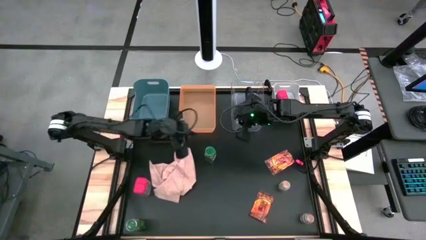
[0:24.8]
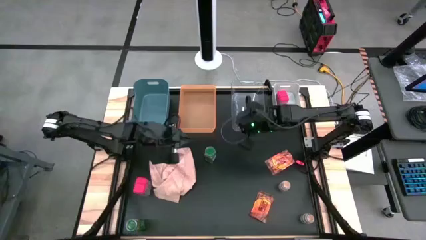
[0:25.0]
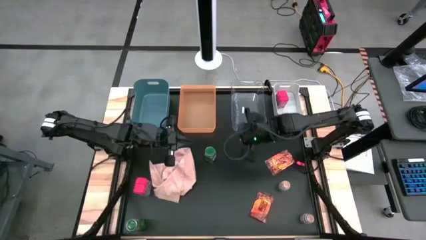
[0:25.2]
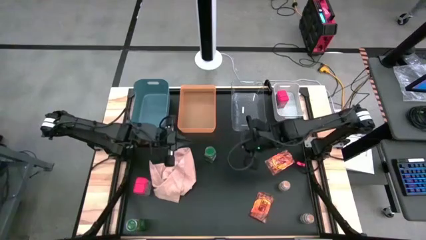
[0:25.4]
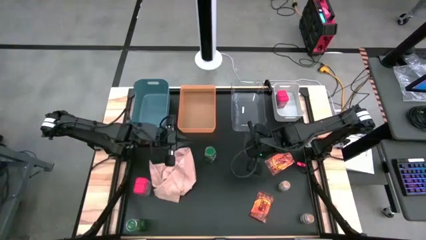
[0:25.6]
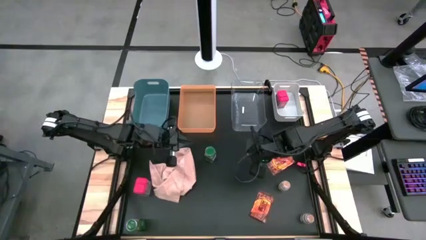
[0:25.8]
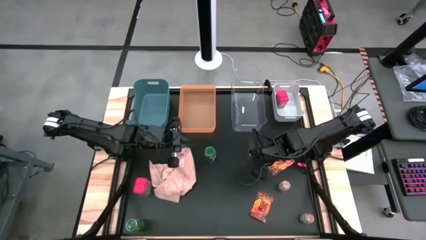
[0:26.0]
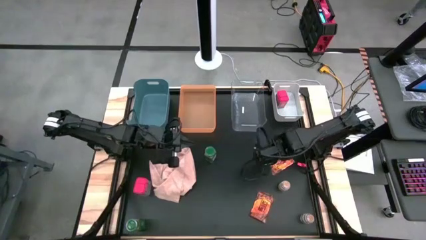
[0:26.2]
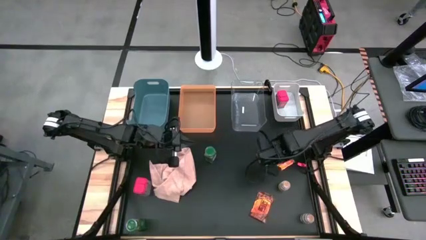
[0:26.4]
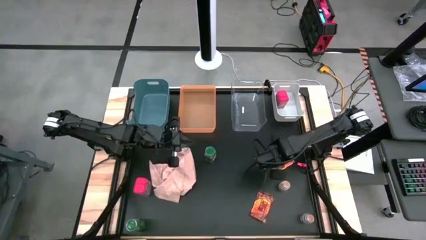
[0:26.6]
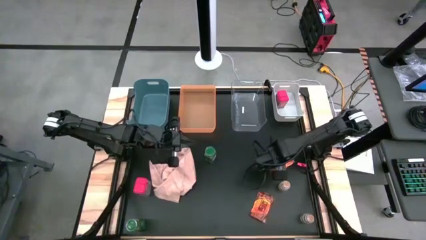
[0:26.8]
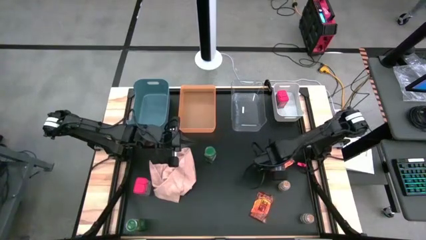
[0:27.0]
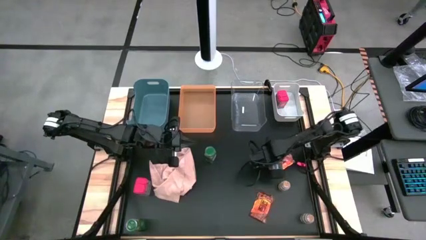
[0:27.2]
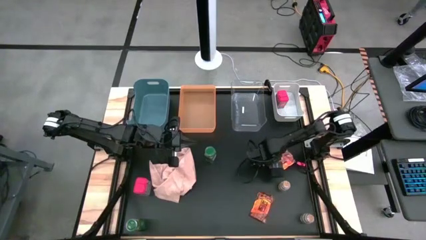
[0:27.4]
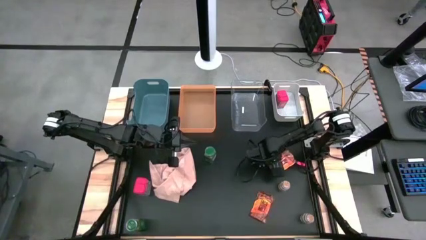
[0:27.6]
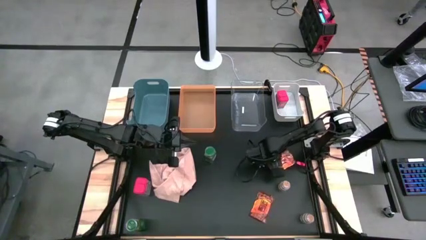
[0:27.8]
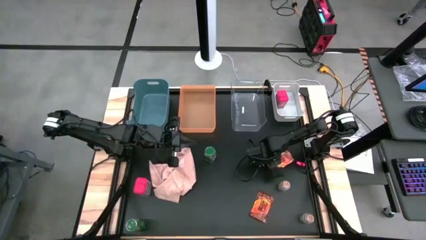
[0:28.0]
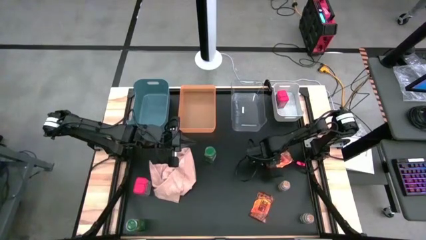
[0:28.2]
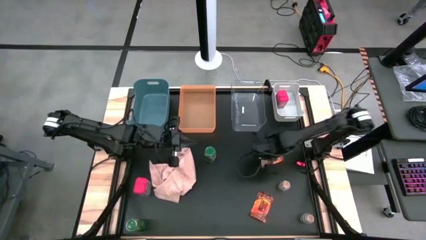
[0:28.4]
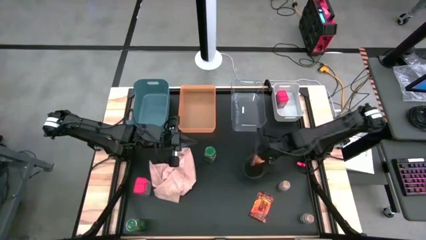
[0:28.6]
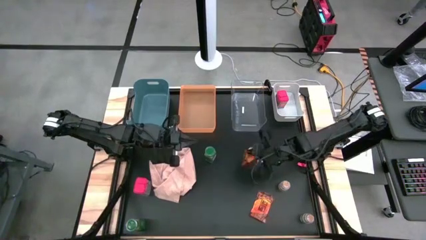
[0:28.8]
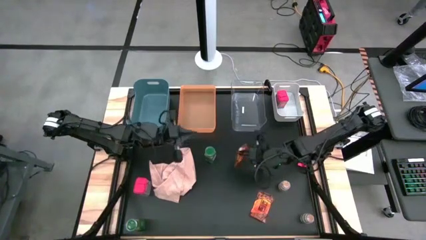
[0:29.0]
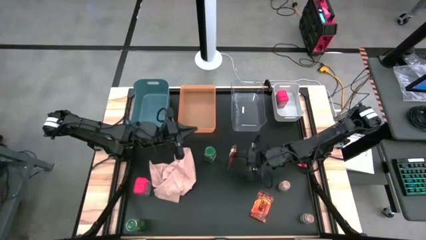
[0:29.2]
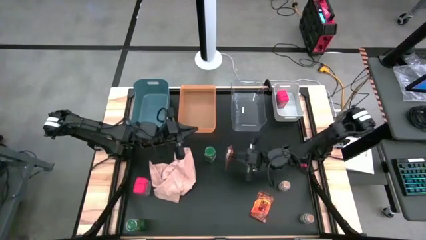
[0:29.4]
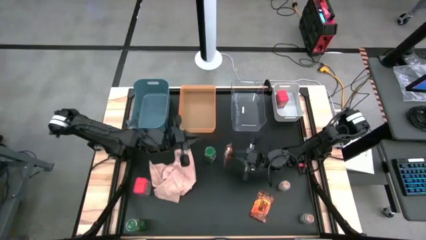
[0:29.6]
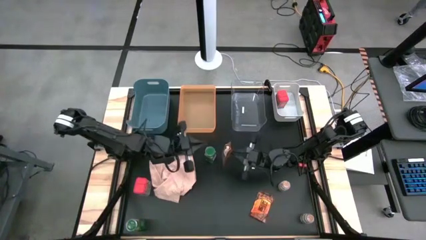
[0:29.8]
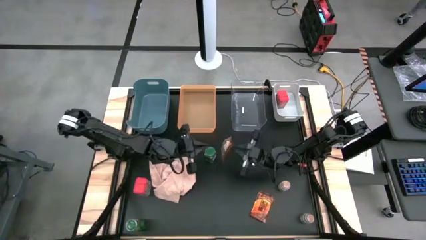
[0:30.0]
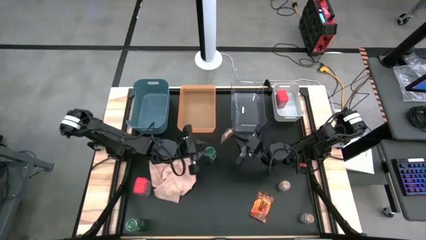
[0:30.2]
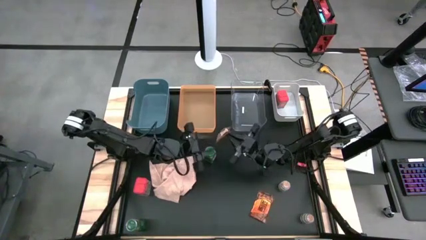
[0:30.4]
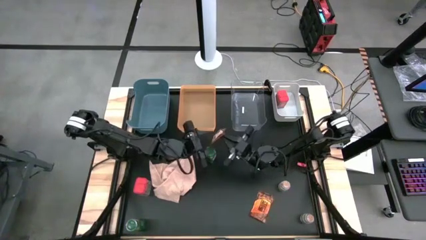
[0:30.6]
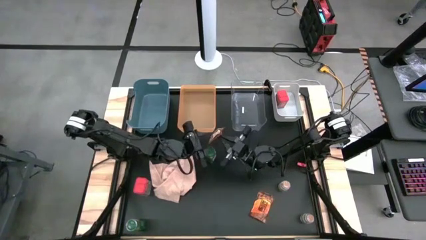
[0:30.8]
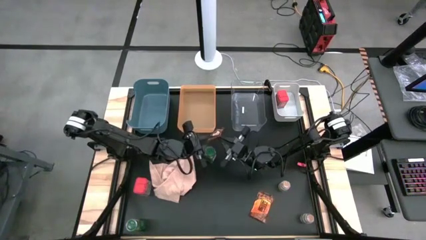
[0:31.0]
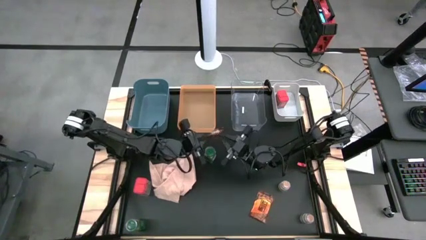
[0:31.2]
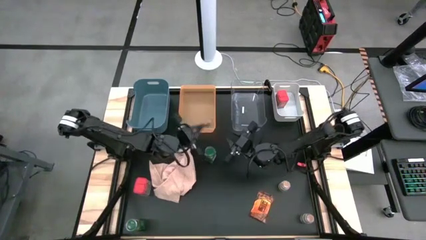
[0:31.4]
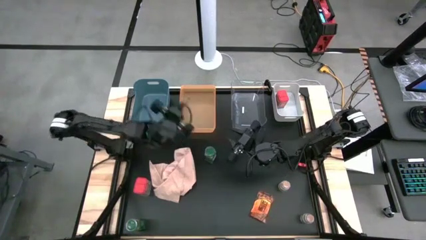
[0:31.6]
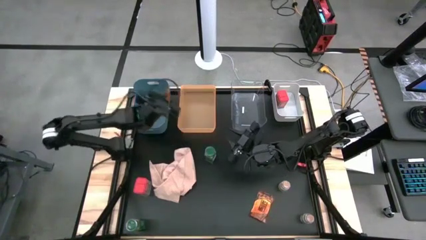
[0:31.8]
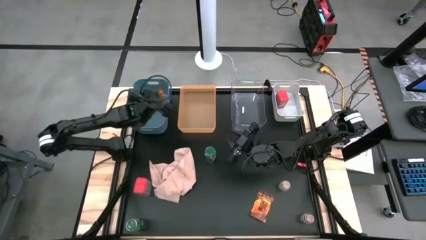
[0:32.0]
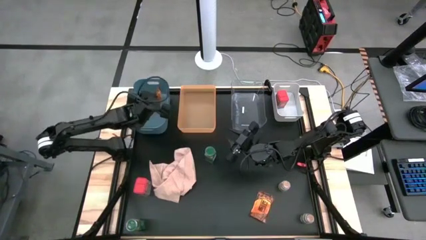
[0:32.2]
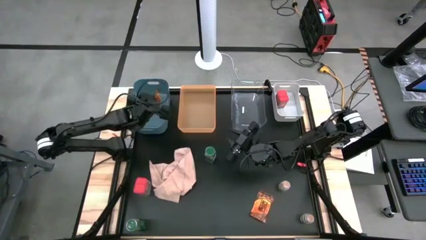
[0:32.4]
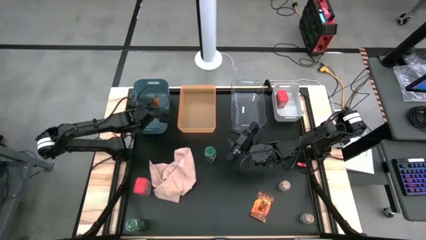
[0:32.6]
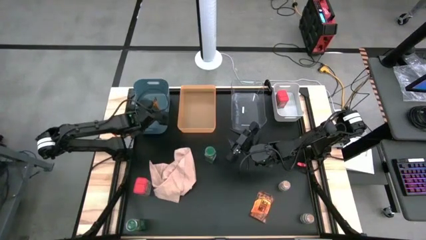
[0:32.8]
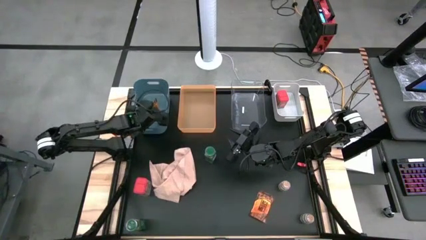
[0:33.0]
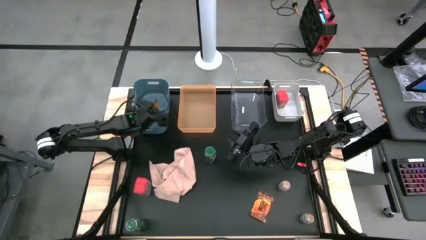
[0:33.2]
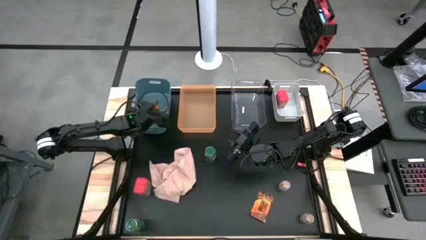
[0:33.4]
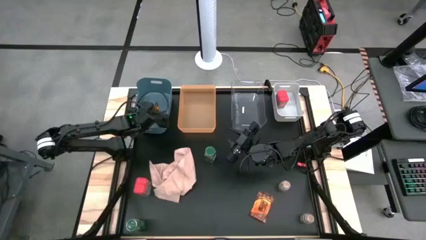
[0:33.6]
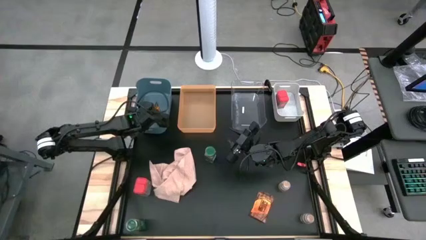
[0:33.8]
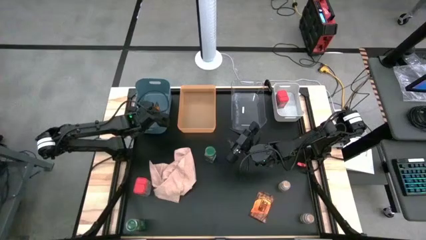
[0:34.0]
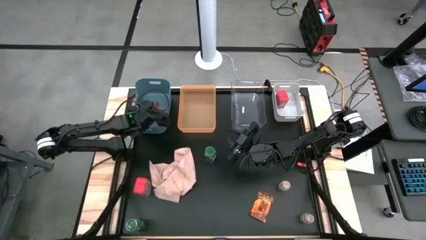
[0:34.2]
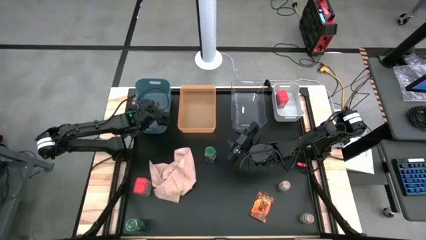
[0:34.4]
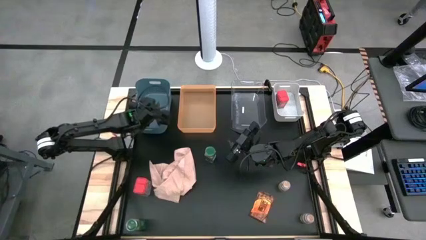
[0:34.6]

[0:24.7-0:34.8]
Task: Sort spices by type
Put the top orange seasoning pack into the blue bin

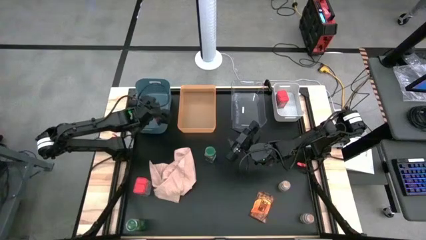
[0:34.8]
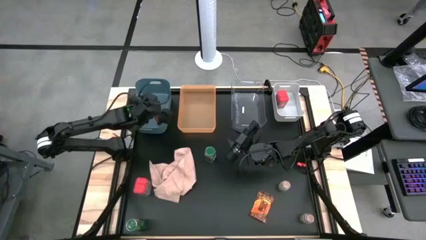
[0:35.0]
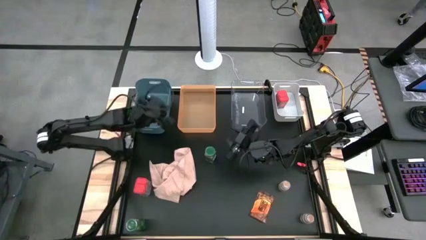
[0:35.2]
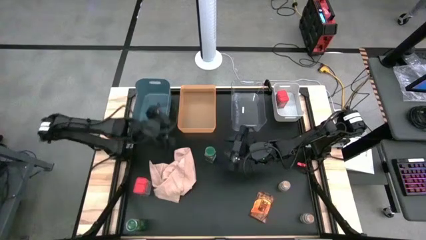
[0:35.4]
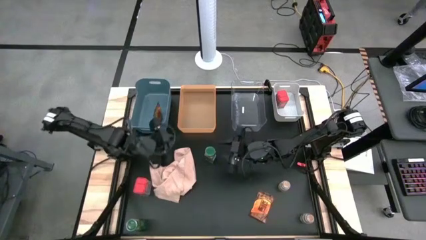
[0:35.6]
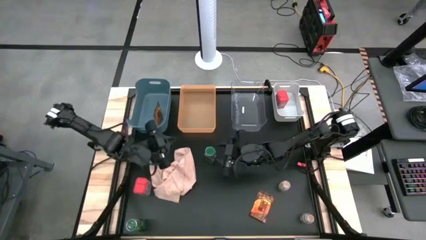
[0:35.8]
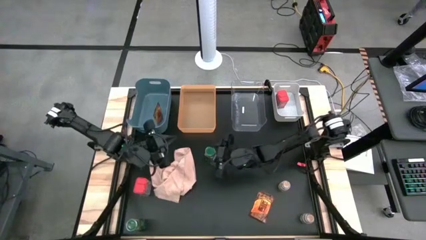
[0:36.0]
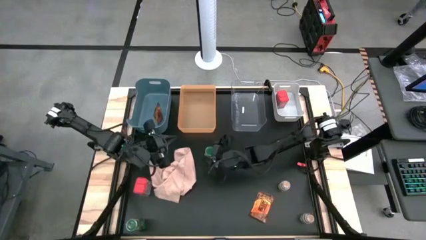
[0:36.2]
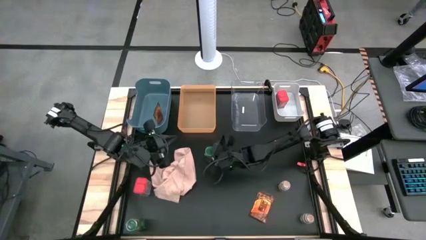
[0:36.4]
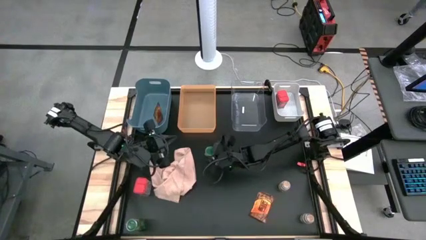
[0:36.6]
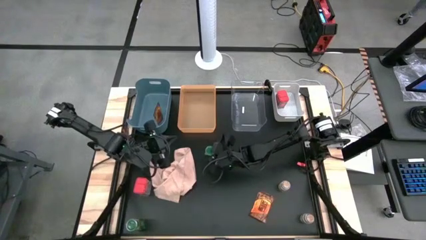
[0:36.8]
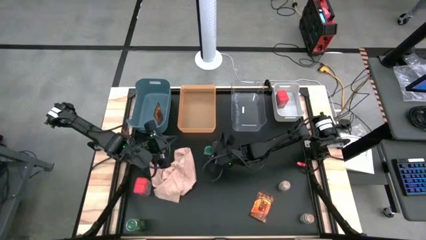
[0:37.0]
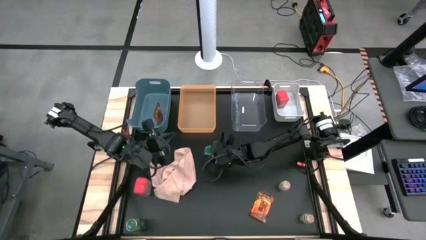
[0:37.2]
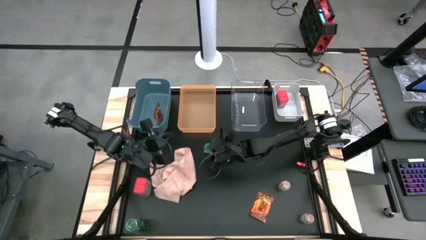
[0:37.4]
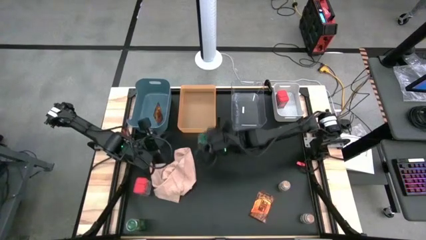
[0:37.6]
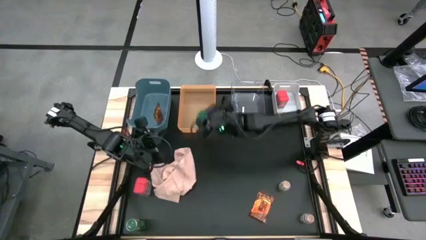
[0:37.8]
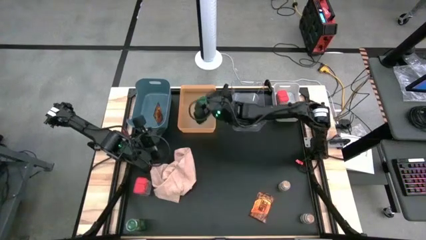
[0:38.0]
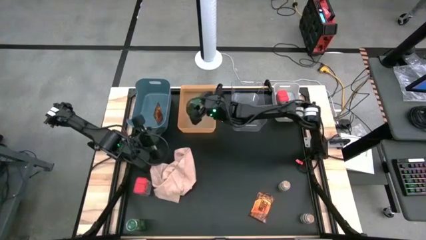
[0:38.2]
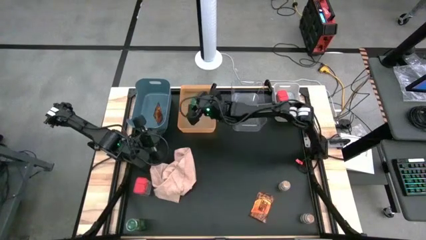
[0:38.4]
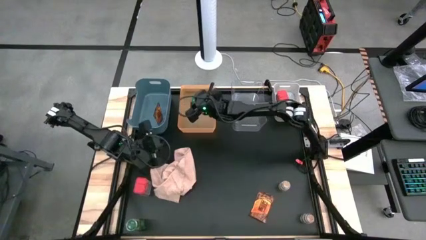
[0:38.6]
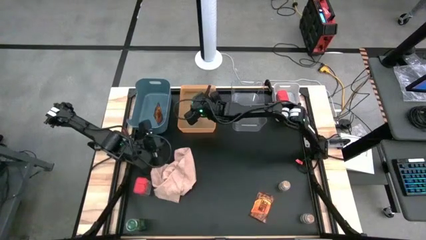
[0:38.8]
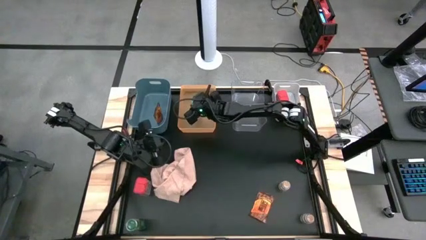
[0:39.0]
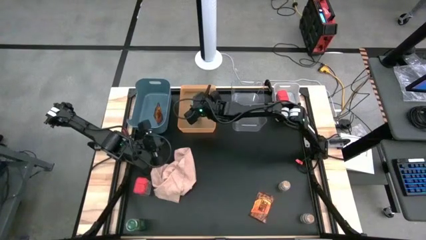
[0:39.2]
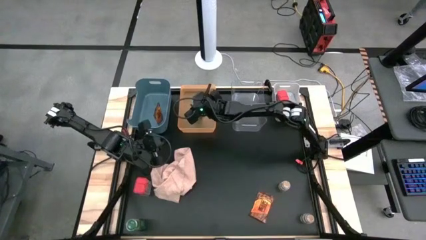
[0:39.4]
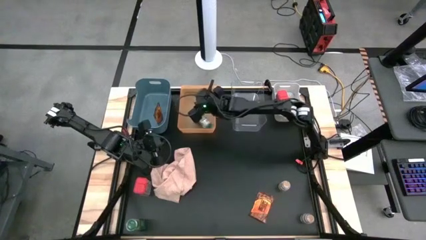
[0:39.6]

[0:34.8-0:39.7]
Put the top green seasoning bottle into the orange bin
